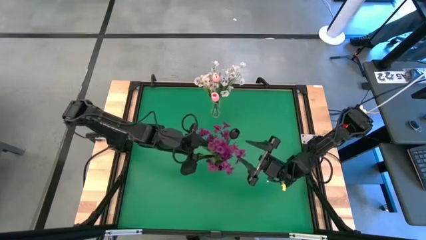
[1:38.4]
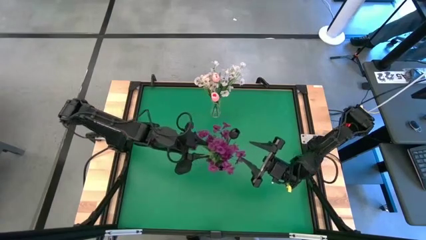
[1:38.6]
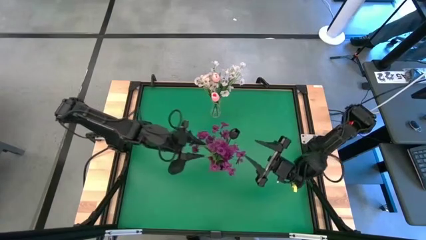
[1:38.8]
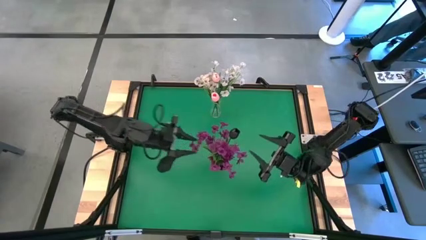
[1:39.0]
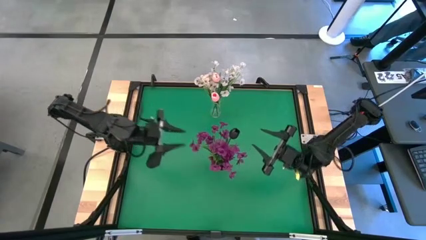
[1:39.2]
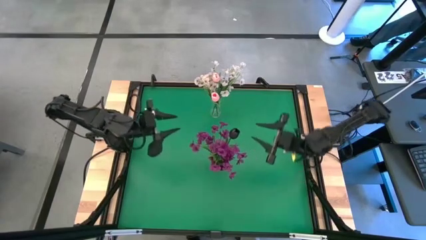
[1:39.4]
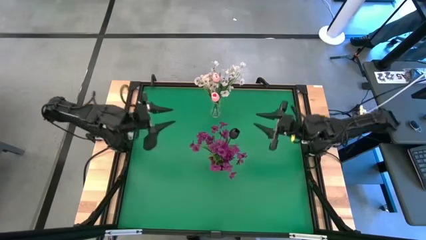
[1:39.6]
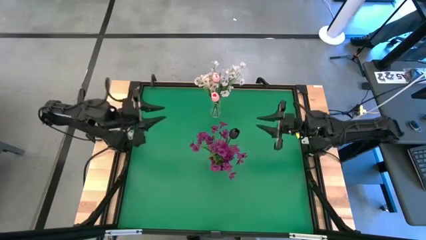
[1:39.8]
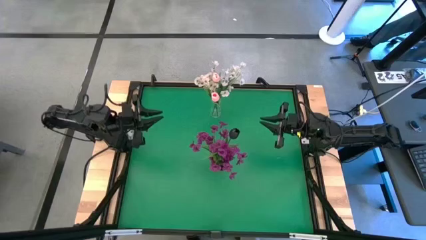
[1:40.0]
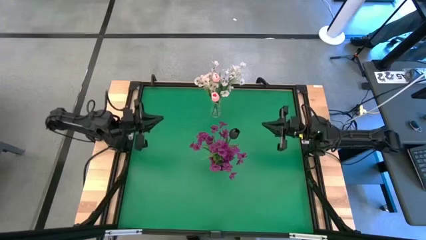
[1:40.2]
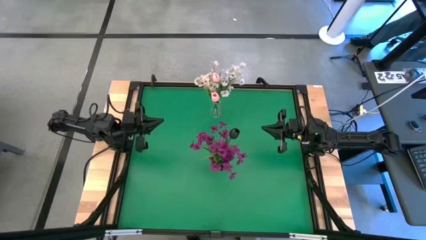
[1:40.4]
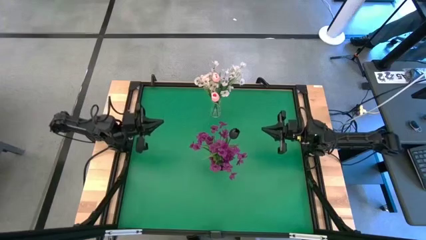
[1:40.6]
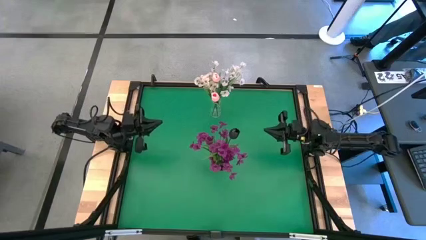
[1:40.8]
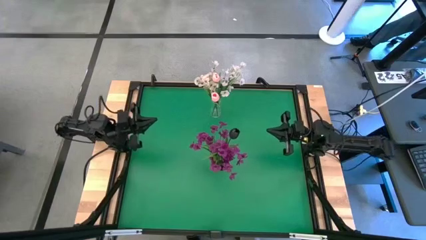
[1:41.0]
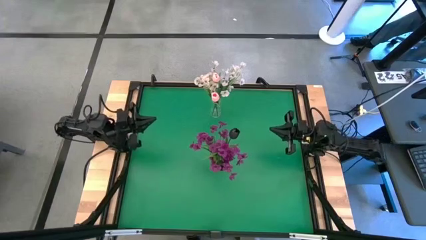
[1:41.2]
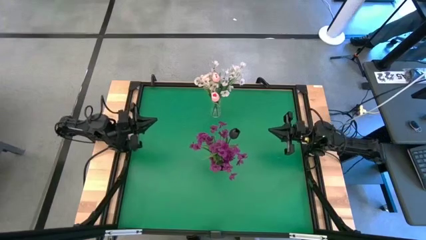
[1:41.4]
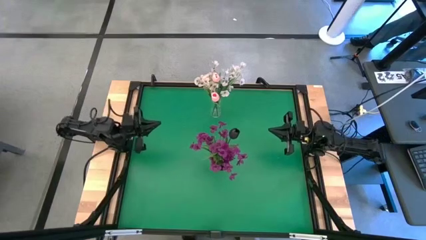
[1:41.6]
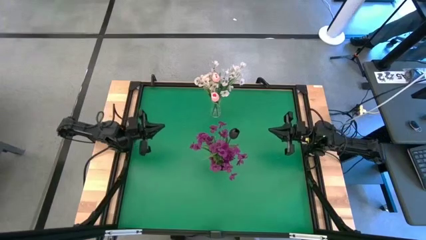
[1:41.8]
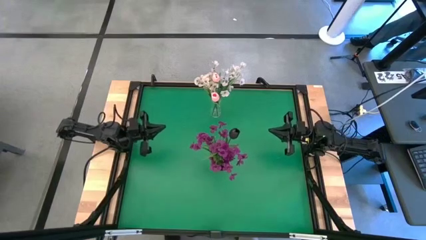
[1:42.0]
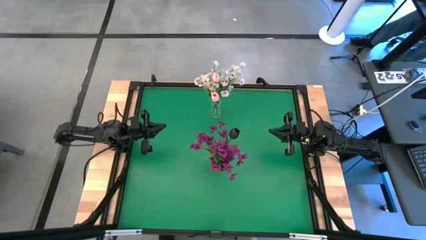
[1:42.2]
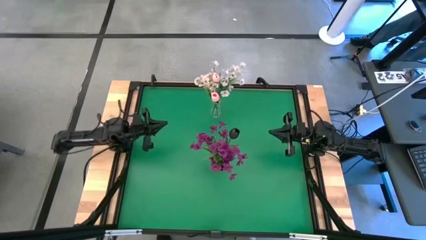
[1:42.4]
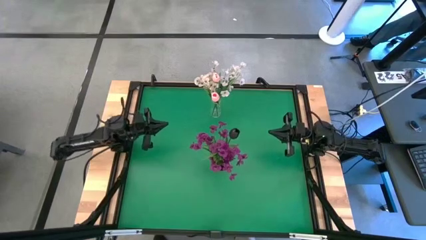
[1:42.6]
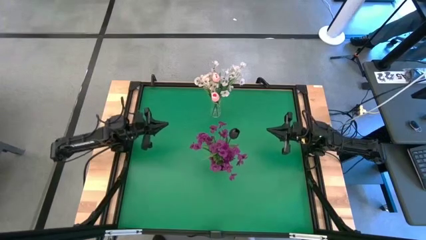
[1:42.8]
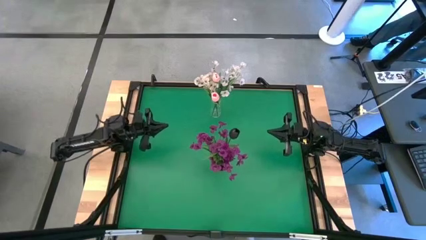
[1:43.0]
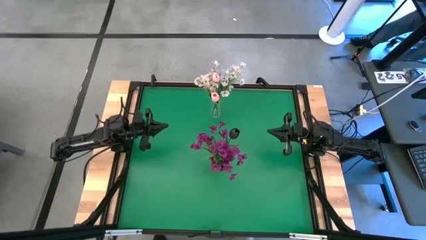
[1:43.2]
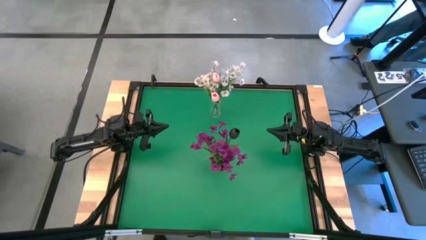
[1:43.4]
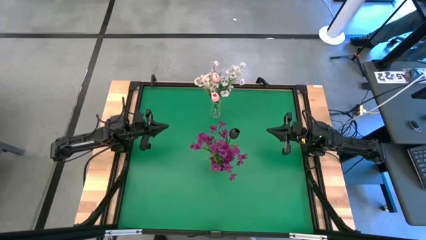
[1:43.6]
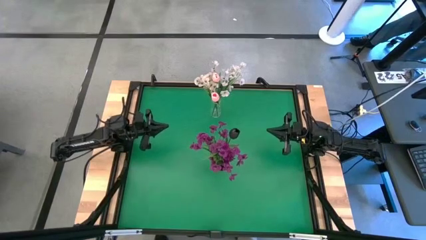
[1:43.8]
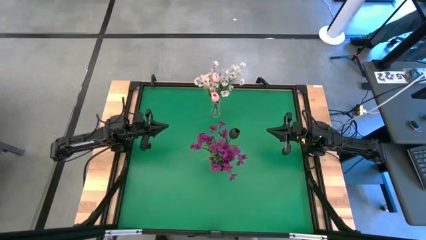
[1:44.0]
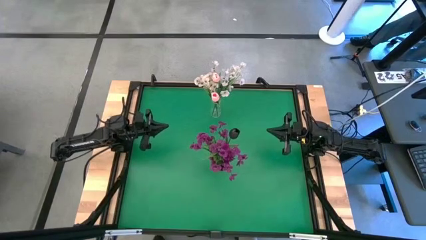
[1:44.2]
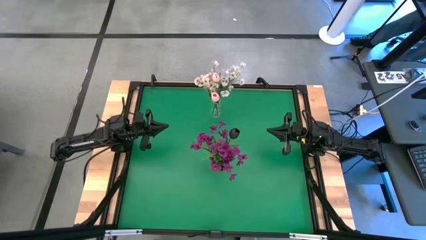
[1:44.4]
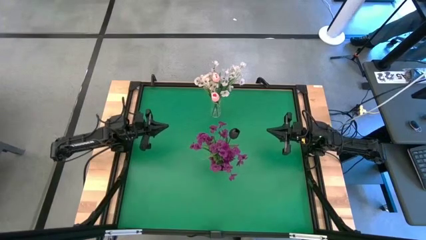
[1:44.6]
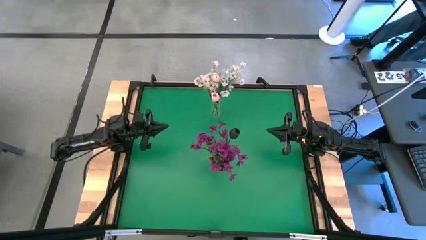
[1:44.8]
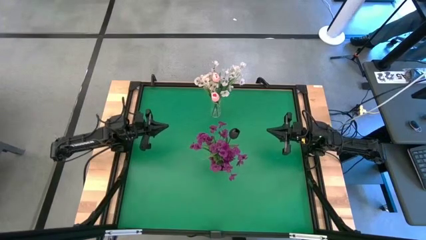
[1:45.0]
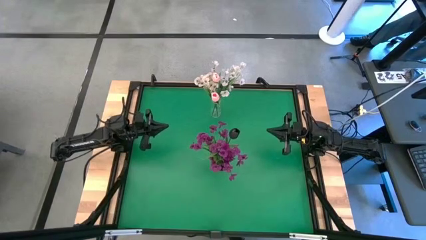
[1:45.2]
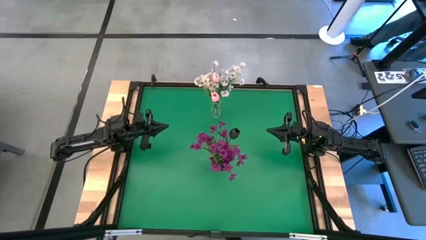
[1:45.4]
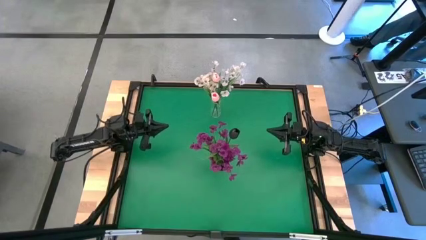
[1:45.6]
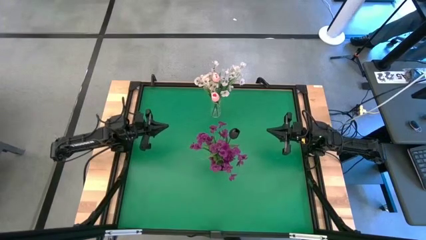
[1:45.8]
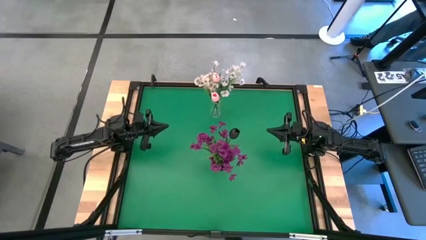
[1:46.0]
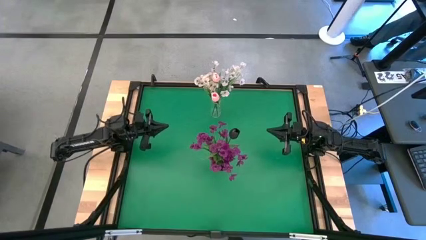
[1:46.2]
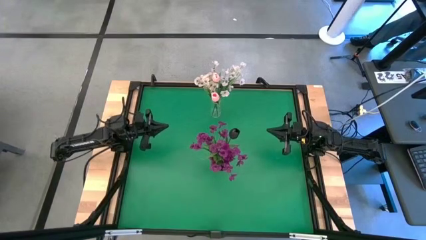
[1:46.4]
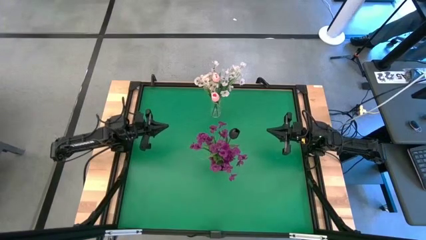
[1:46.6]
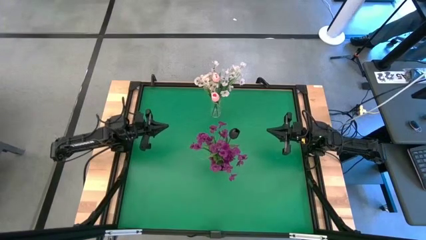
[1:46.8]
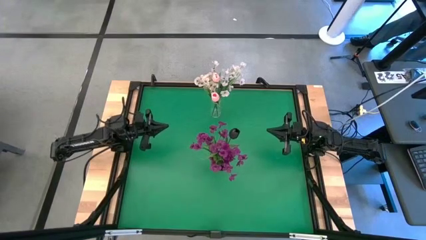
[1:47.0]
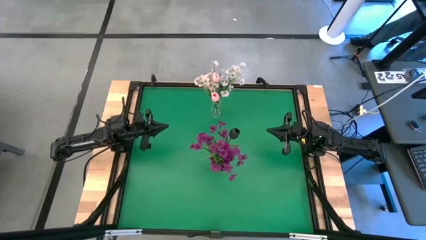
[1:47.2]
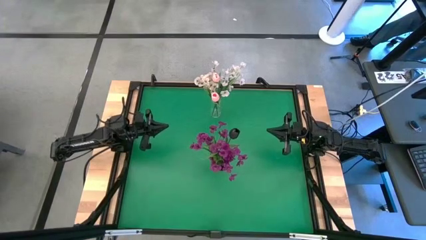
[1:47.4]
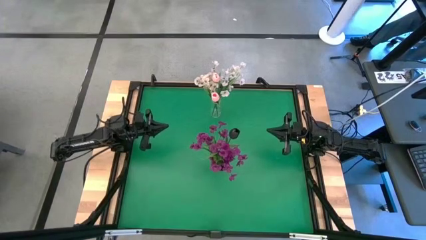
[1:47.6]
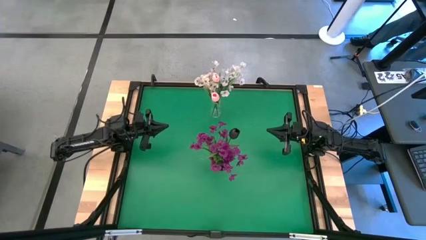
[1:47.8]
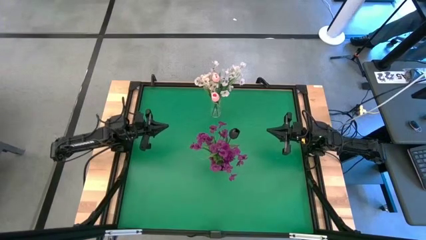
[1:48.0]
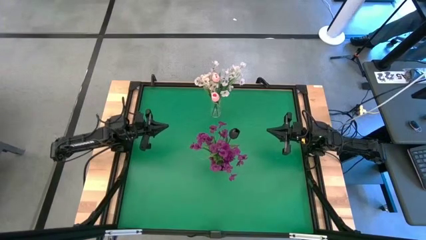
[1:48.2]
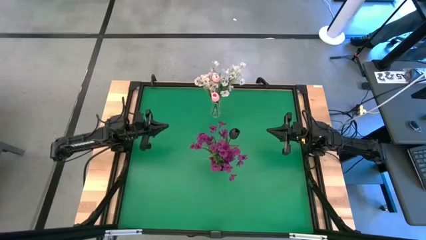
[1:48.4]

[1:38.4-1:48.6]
Task: Sort flowers into vase by color
Return to Home Position

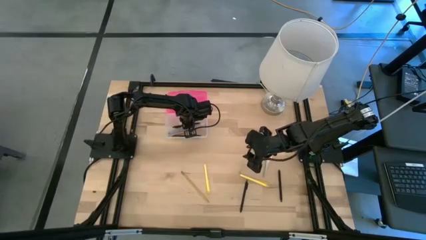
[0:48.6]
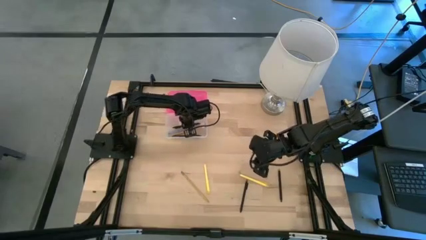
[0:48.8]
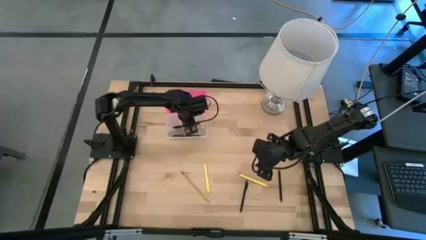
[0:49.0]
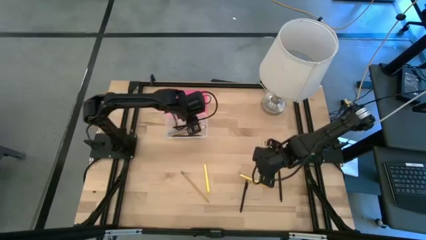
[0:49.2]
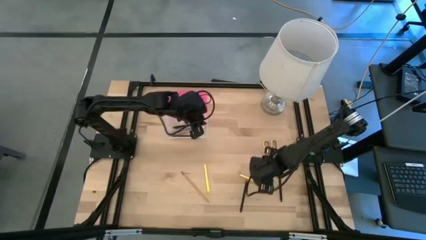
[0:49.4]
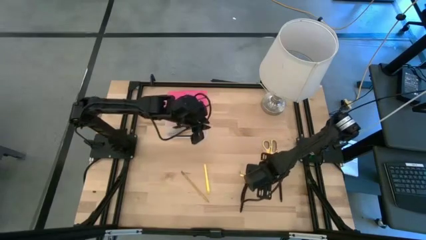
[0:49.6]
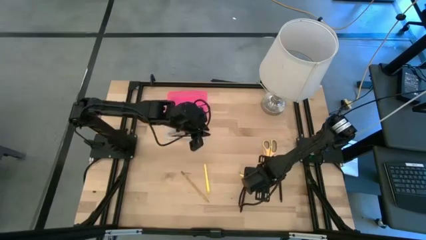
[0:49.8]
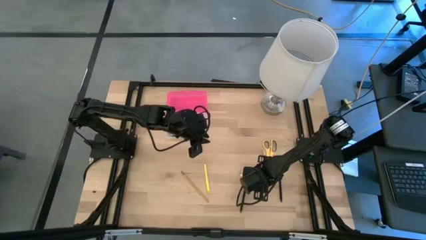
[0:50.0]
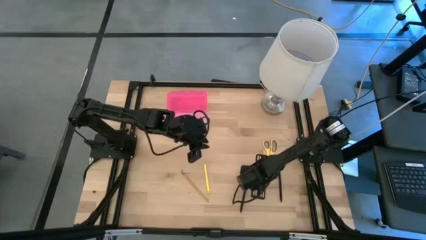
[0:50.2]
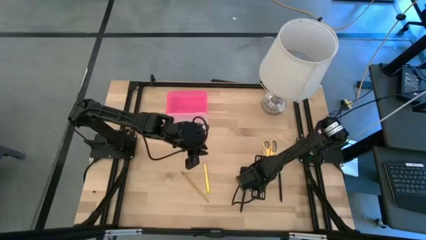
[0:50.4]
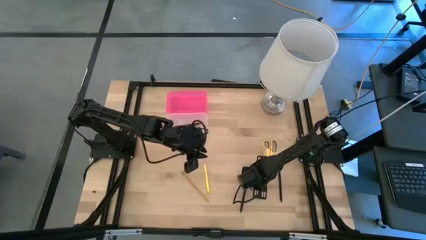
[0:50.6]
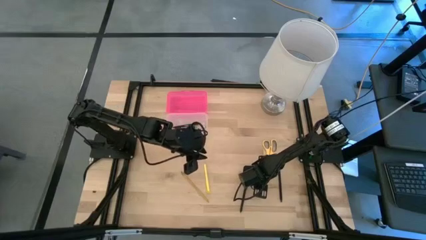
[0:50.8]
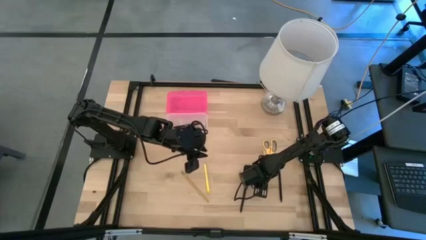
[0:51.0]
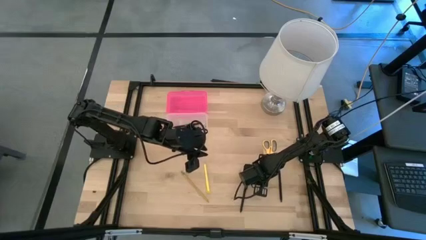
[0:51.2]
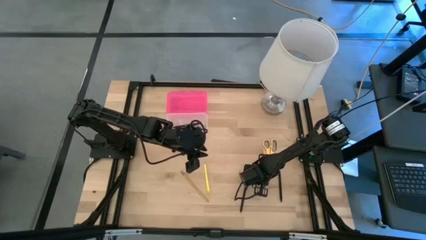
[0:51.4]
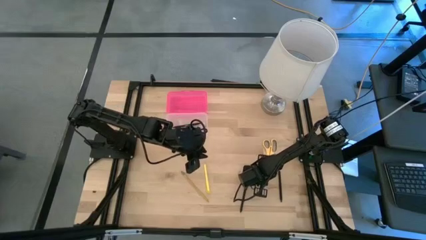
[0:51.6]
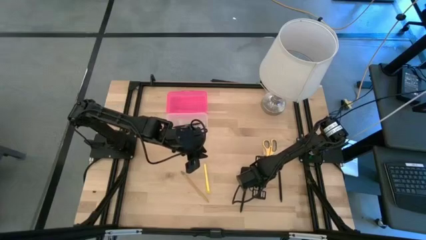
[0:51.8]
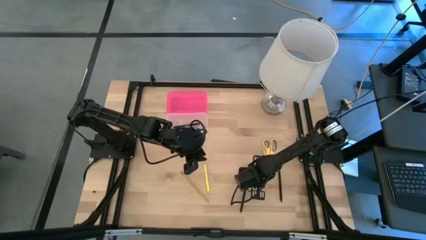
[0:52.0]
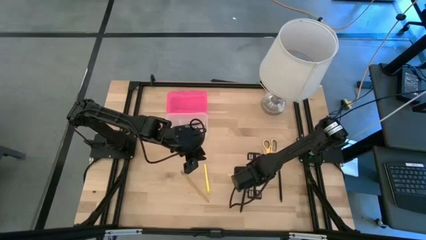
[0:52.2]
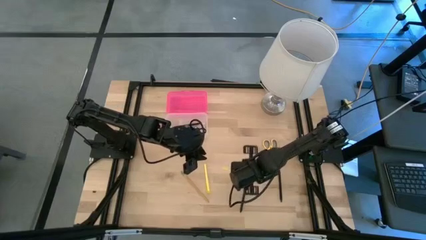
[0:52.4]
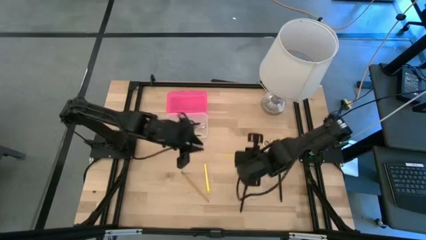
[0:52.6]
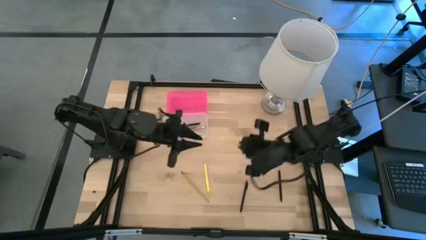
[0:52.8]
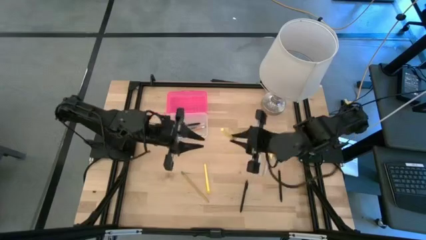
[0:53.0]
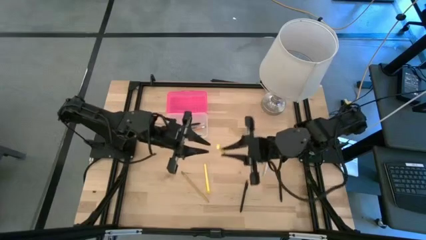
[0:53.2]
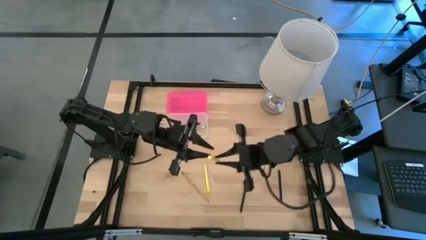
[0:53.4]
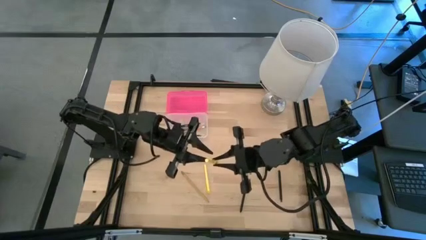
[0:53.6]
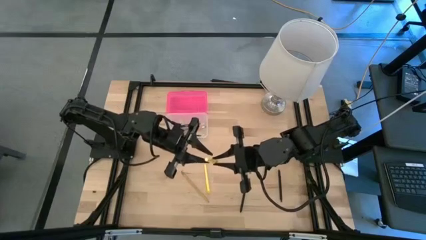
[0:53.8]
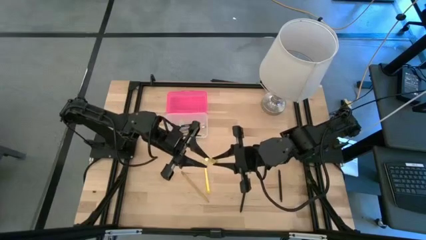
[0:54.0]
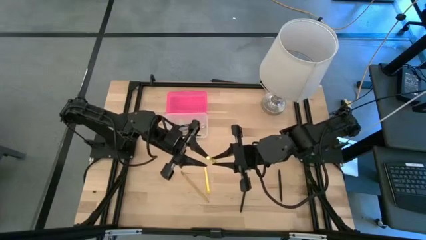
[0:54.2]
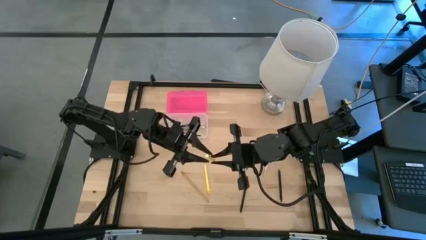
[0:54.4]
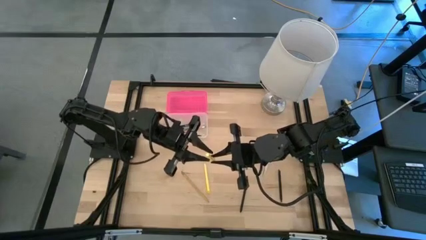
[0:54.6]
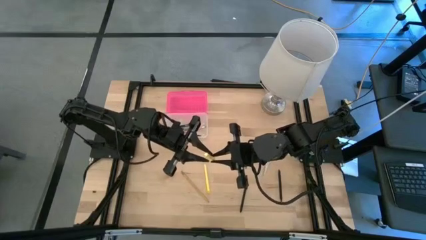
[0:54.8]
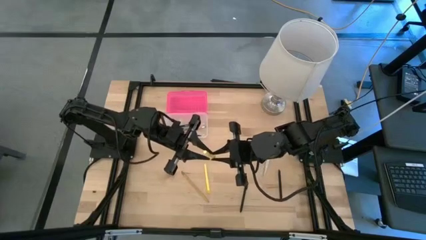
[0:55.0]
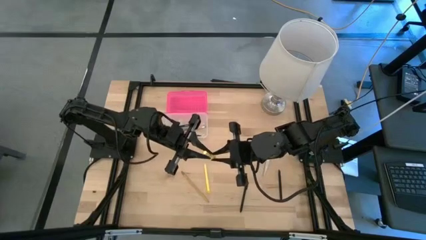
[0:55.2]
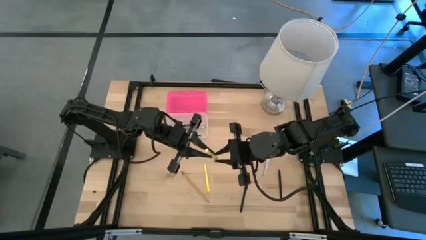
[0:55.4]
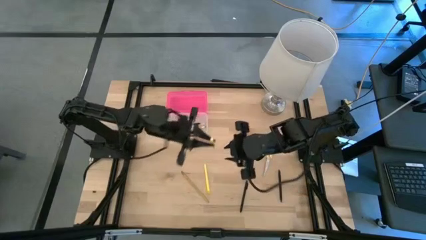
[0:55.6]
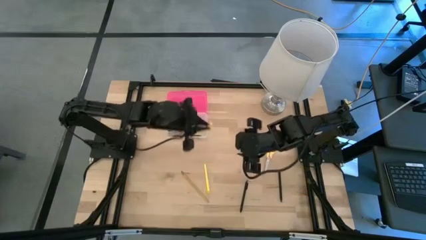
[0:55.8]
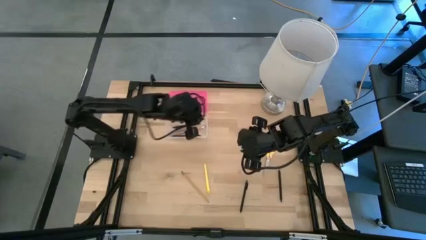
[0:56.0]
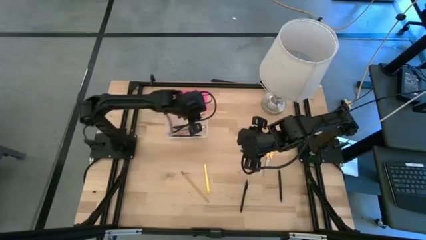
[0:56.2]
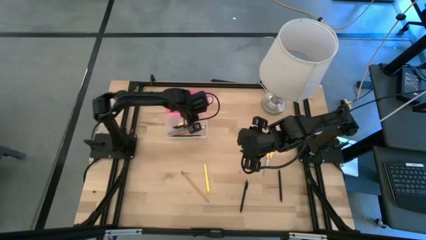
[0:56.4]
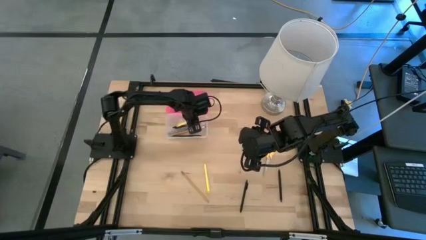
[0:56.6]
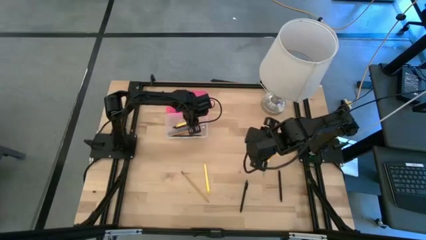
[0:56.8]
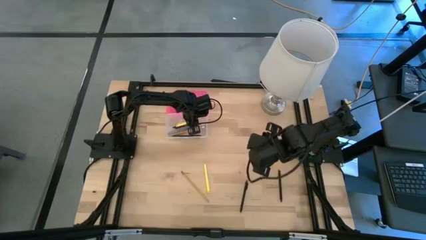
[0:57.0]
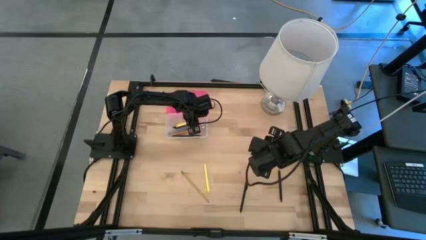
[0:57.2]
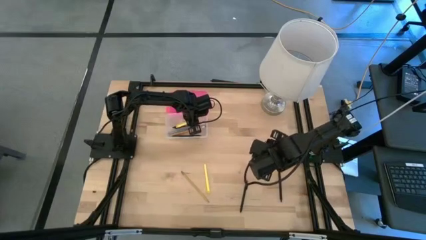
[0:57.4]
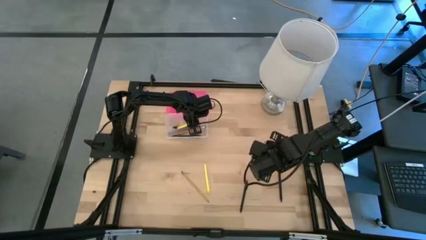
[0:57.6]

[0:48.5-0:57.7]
Task: Pick & place school supplies into a supply box
Put the yellow pen into the pink supply box
